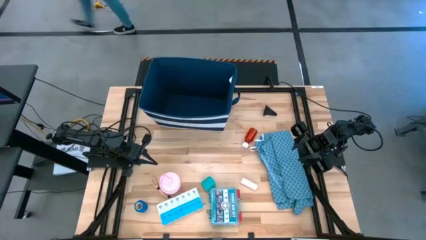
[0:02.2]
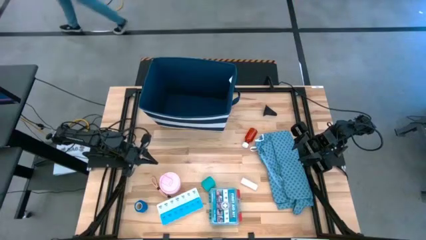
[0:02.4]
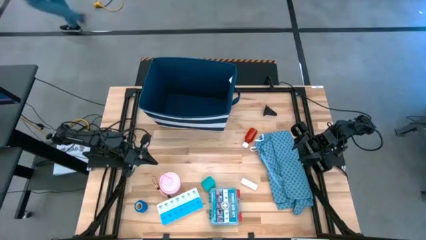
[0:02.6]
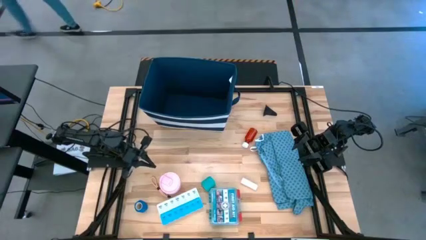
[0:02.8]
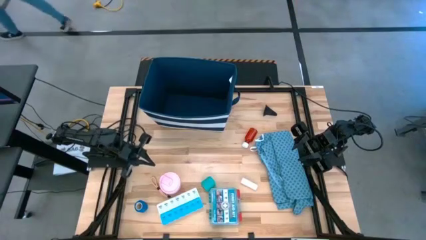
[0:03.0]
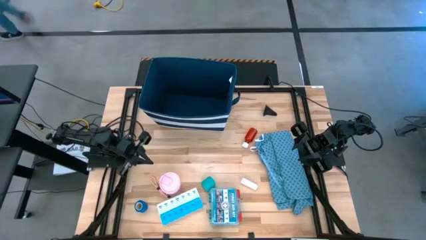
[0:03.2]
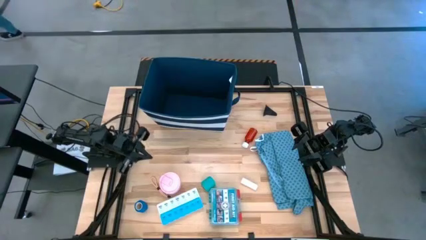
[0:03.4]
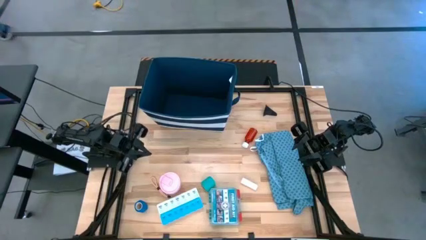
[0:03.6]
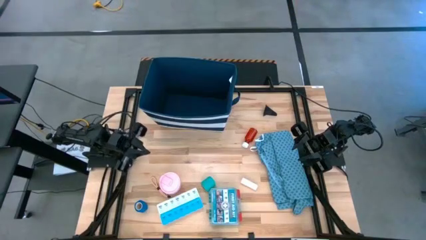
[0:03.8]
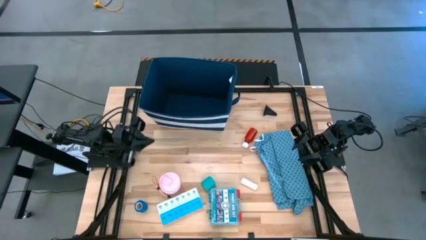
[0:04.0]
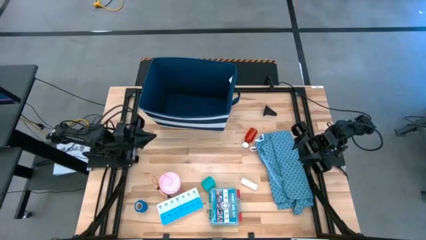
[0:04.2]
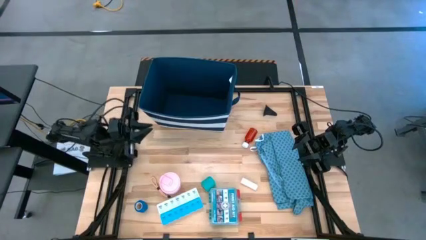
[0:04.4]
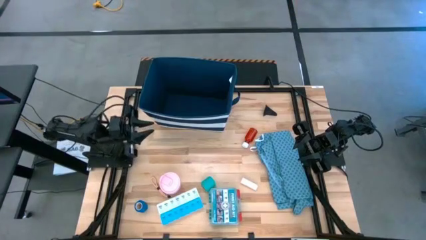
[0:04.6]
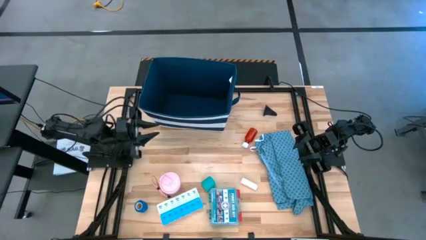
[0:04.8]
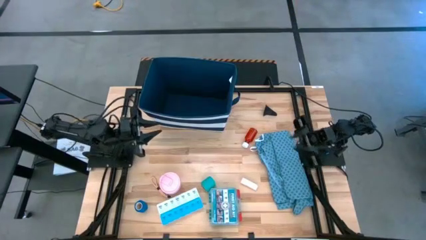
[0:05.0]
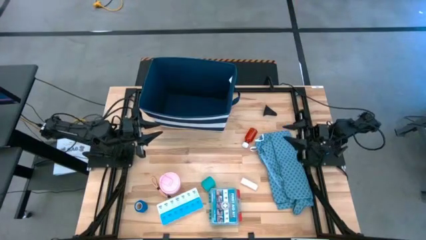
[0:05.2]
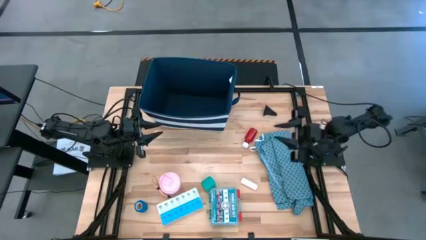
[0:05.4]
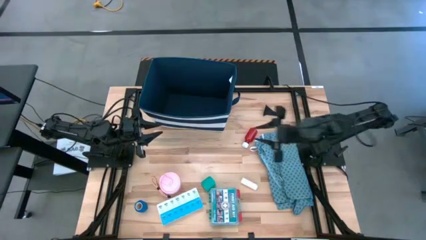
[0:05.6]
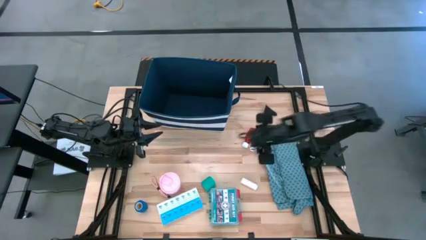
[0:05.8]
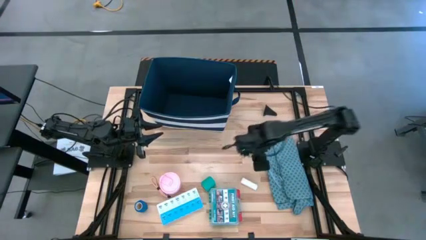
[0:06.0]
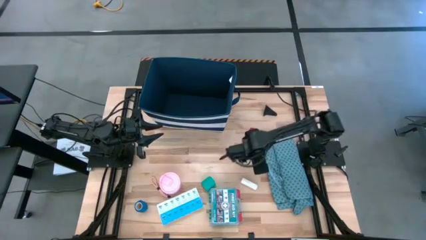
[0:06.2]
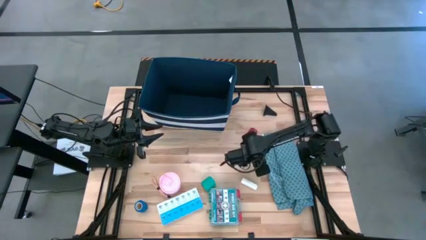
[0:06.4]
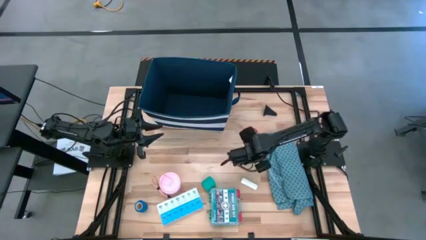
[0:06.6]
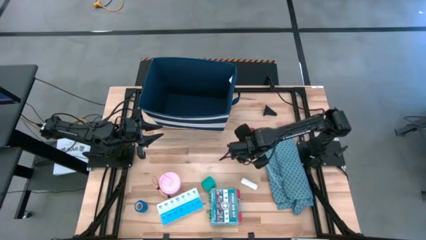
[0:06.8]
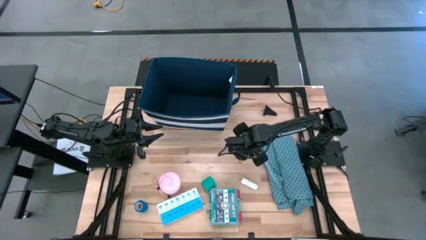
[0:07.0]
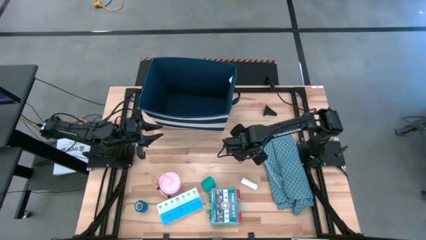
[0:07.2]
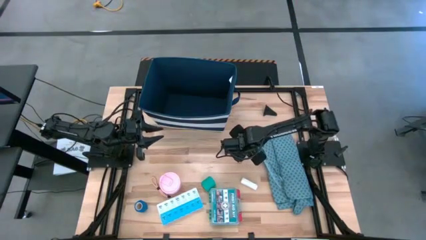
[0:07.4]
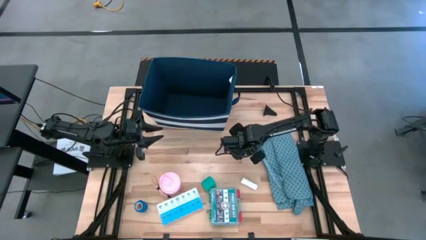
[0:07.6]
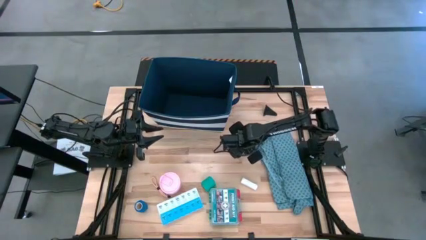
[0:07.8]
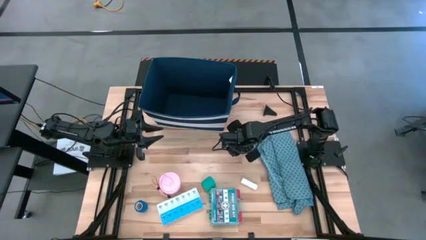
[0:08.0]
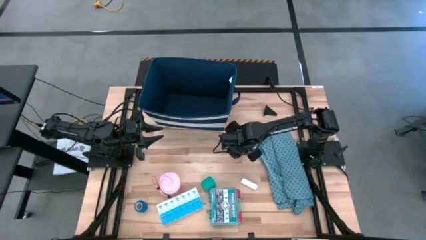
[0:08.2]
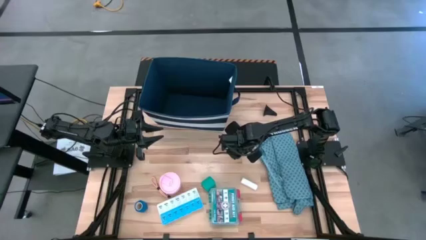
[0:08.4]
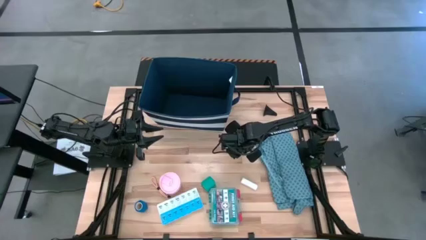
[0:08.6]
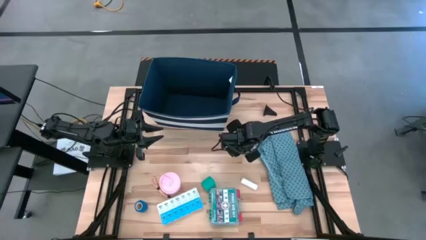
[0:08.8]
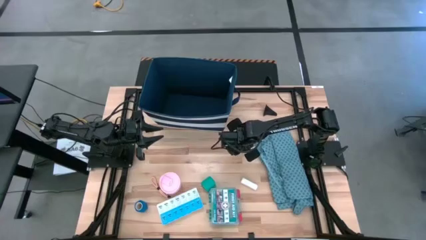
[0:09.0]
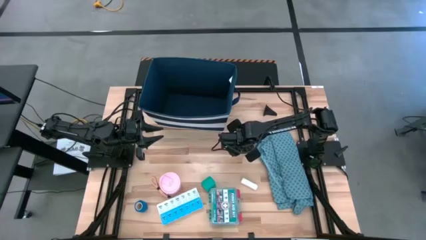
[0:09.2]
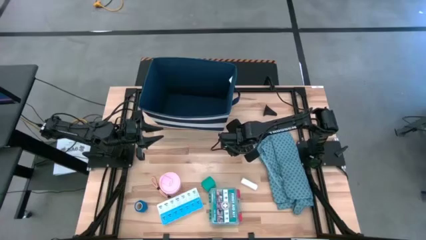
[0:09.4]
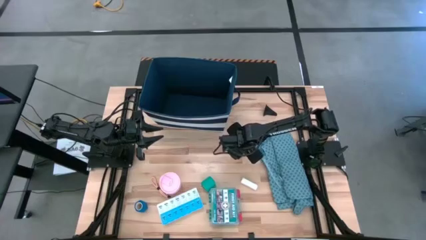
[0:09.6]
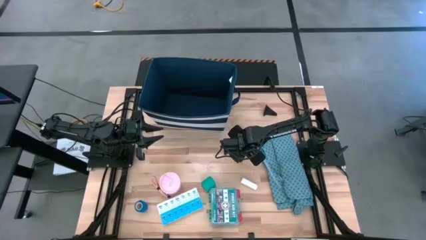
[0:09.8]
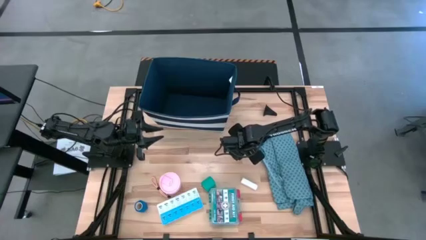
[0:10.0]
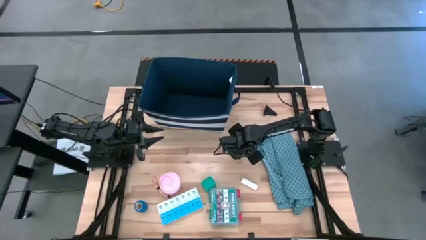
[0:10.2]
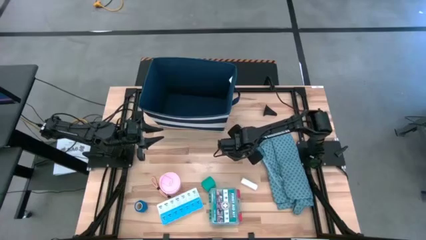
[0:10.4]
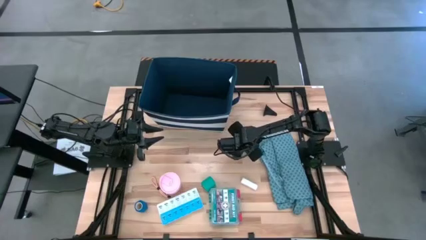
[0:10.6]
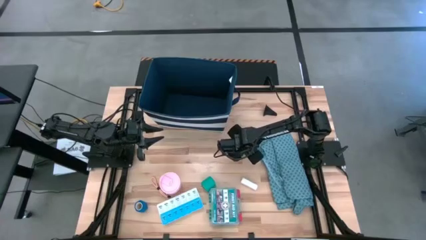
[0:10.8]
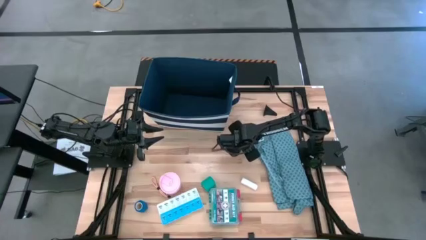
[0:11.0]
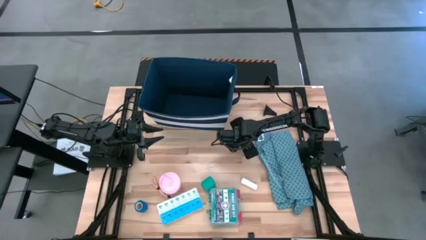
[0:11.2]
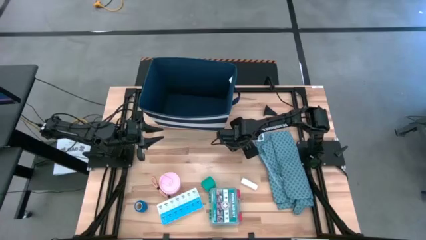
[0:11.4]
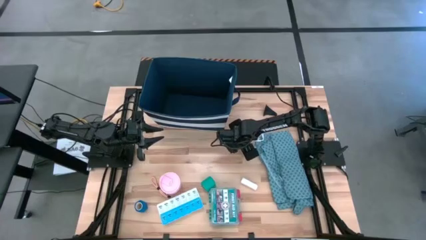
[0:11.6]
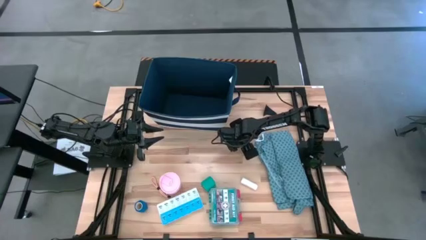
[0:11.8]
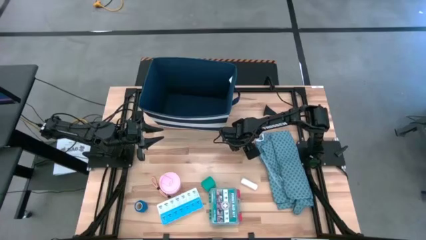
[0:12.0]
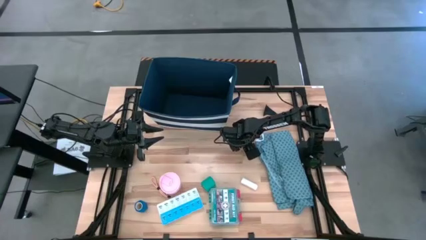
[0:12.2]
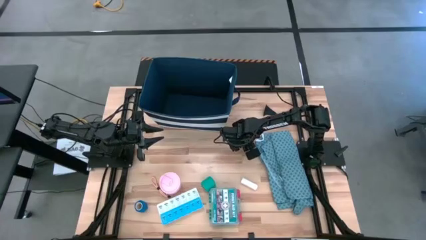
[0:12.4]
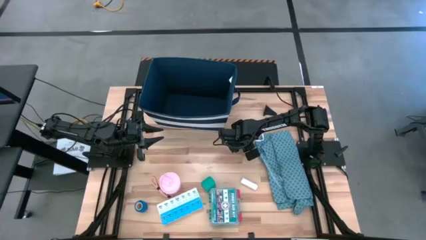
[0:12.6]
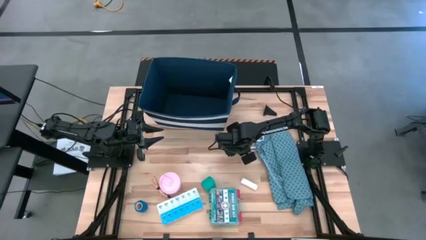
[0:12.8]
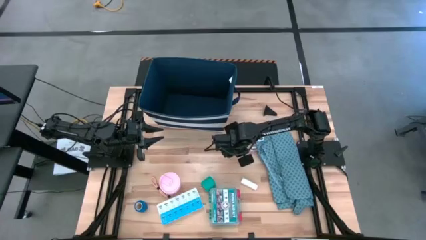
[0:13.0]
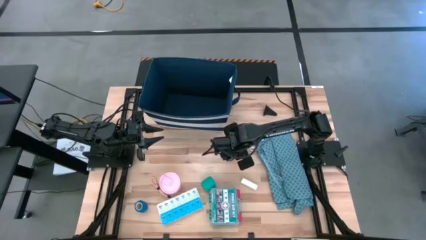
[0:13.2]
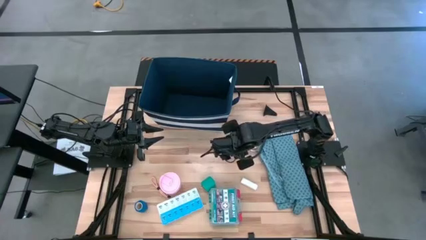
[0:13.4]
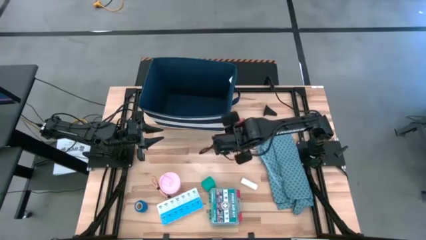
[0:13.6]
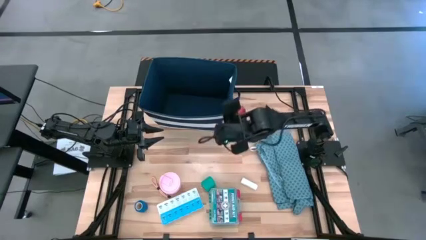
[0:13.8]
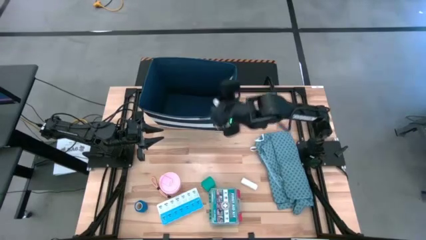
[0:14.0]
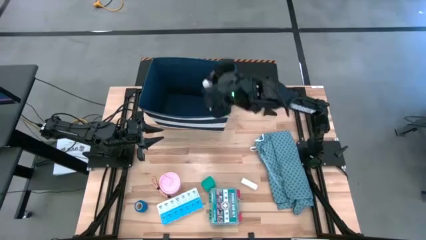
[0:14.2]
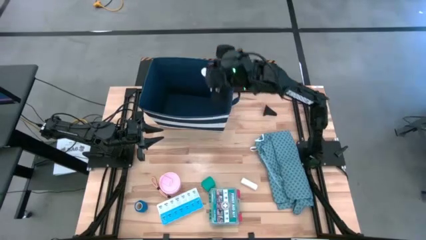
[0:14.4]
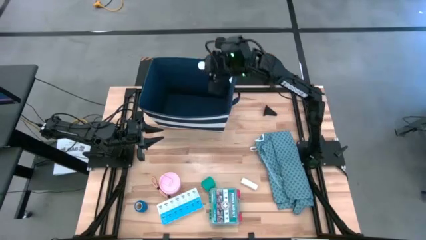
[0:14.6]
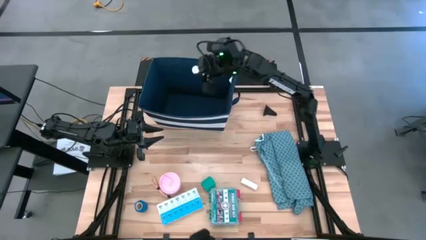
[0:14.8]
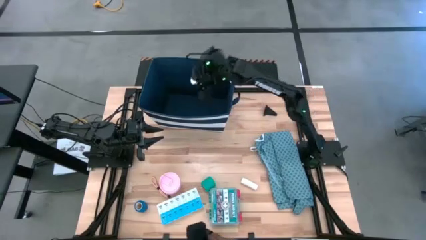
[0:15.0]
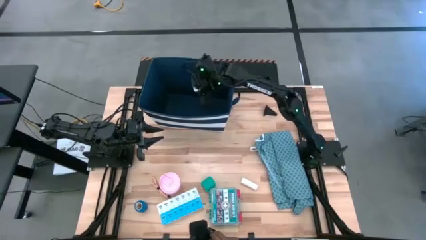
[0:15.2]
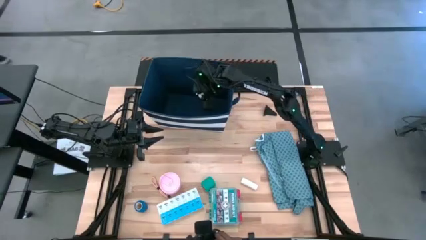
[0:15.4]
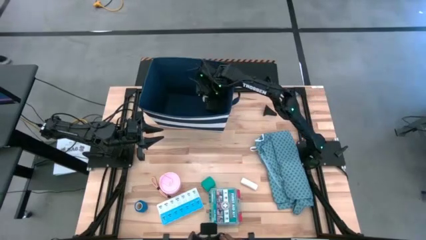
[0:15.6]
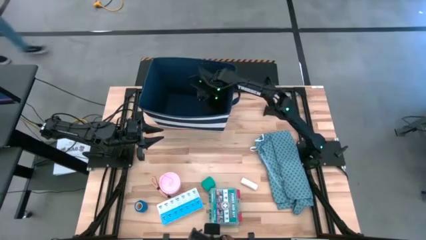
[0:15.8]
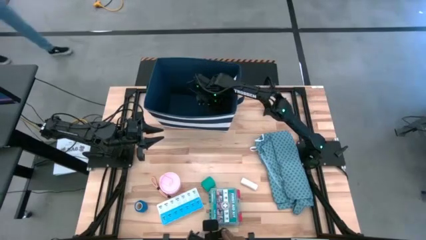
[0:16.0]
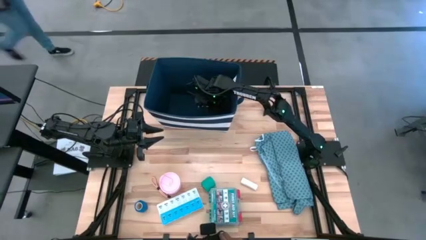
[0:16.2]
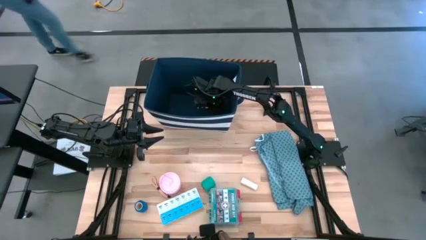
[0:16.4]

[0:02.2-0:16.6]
Task: Pick & place medical supplies in basket/bin
Put the red pill bottle into the laundry organizer
